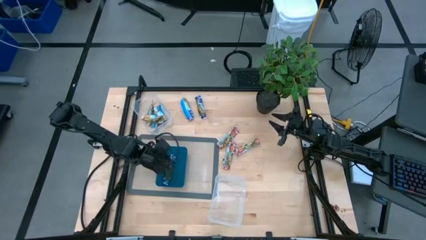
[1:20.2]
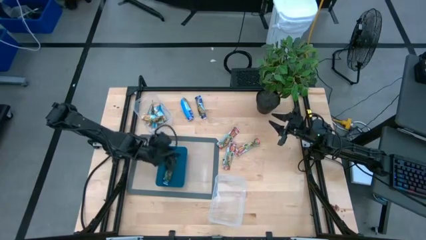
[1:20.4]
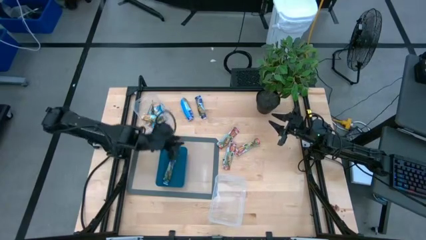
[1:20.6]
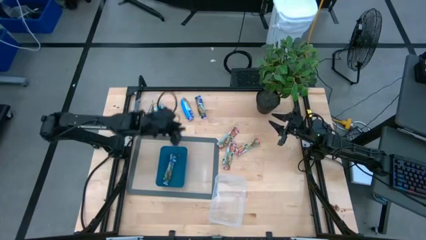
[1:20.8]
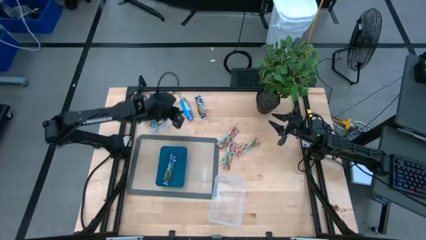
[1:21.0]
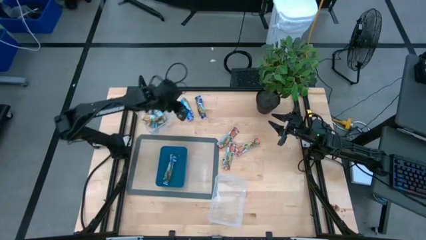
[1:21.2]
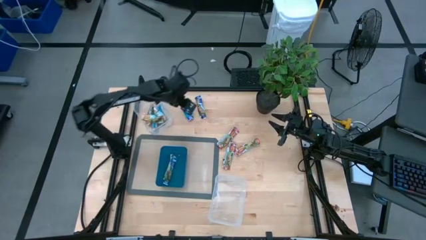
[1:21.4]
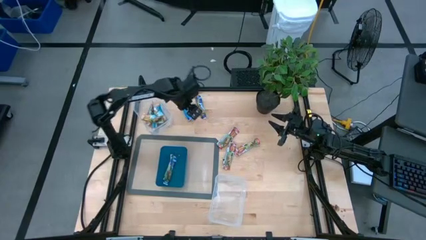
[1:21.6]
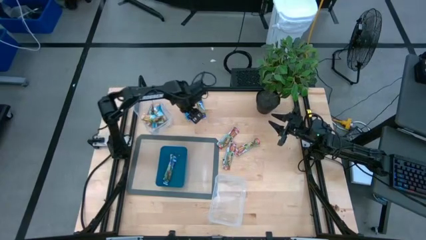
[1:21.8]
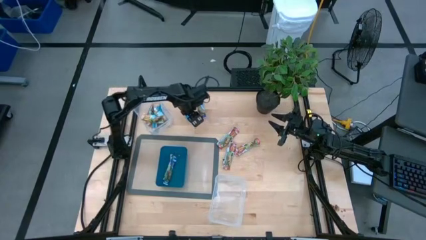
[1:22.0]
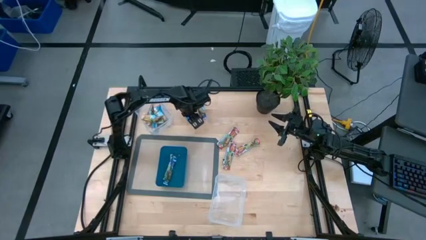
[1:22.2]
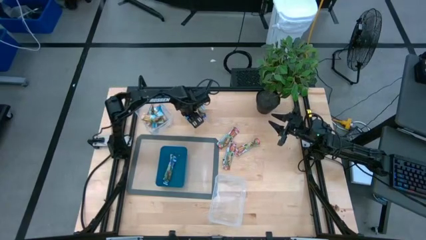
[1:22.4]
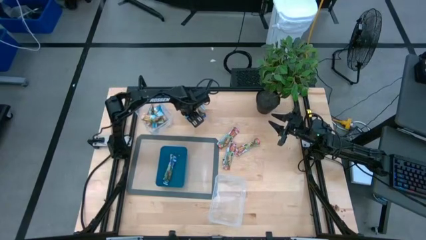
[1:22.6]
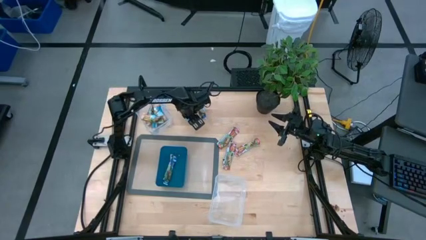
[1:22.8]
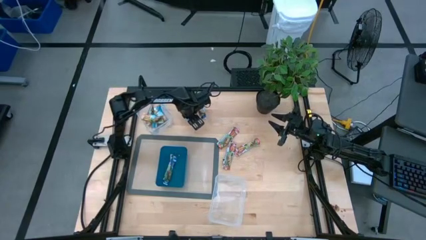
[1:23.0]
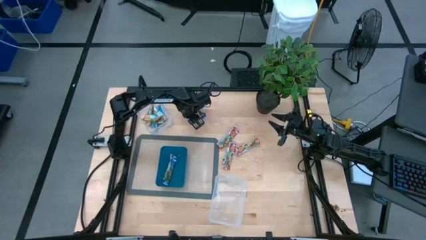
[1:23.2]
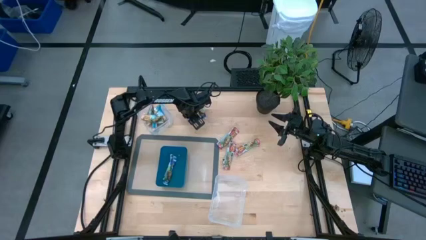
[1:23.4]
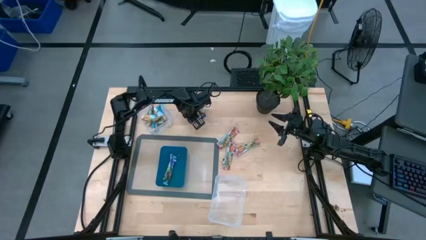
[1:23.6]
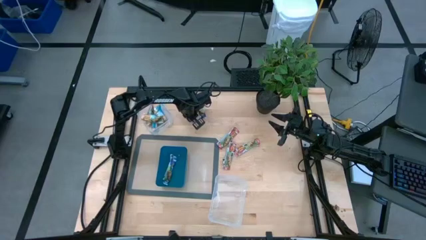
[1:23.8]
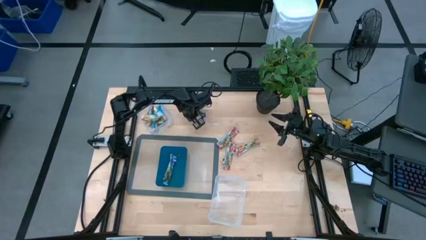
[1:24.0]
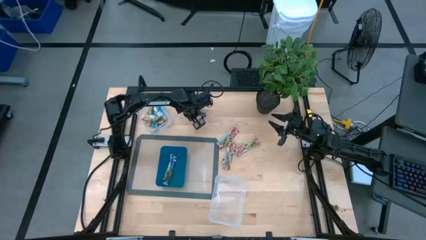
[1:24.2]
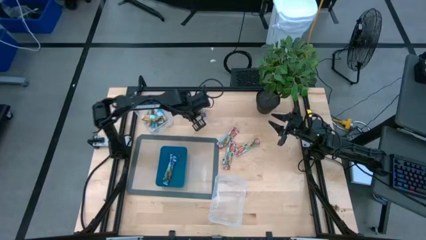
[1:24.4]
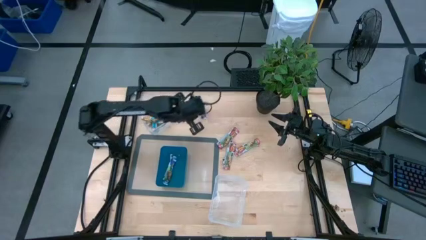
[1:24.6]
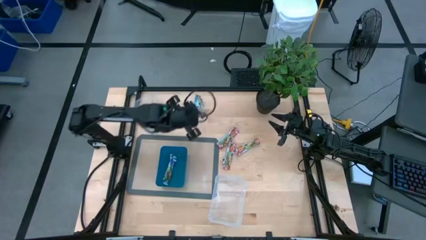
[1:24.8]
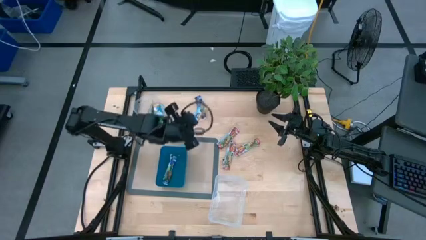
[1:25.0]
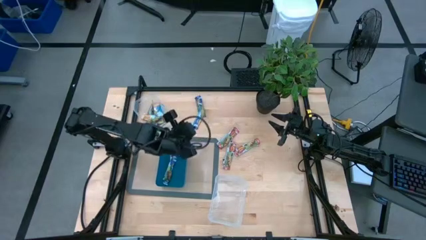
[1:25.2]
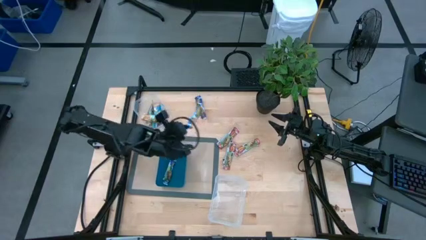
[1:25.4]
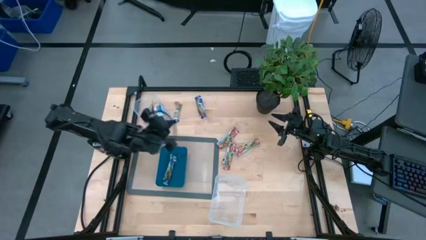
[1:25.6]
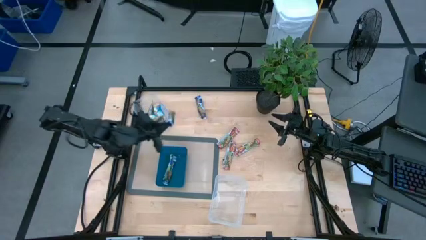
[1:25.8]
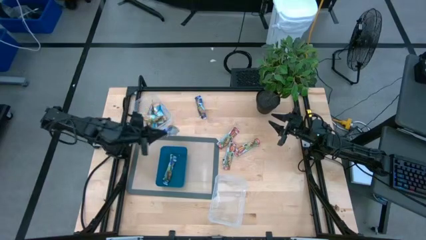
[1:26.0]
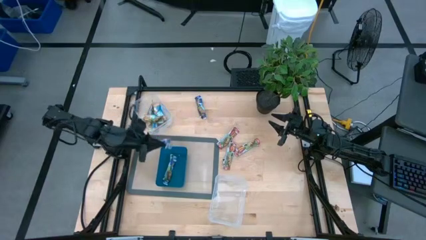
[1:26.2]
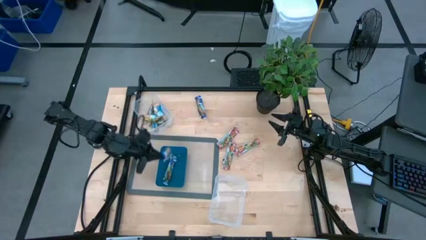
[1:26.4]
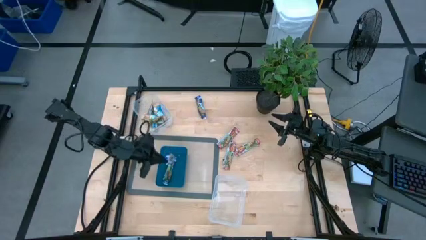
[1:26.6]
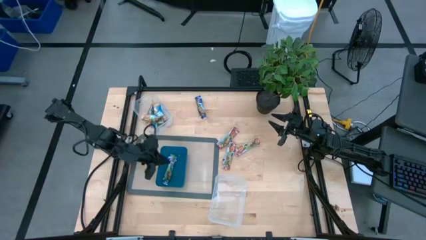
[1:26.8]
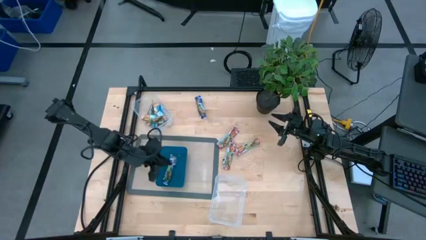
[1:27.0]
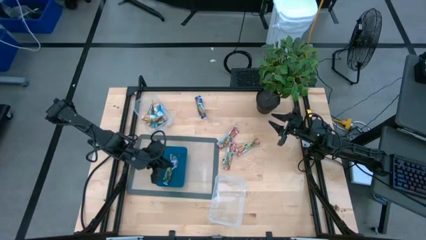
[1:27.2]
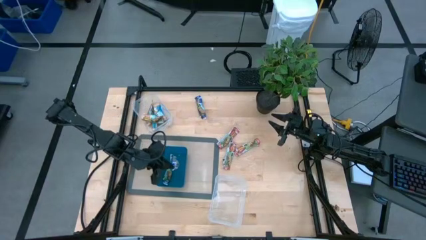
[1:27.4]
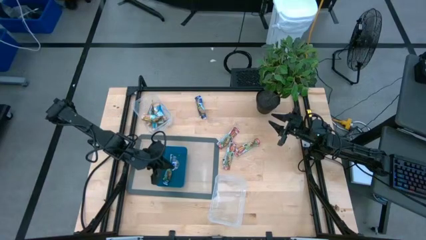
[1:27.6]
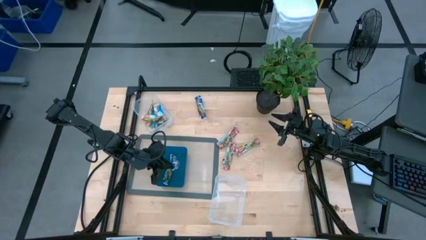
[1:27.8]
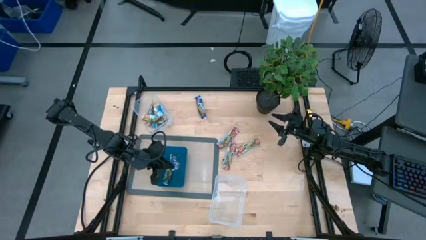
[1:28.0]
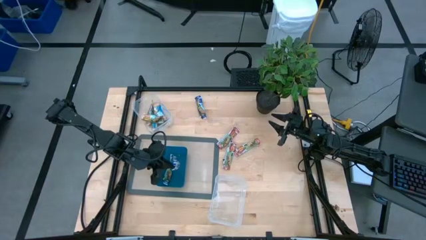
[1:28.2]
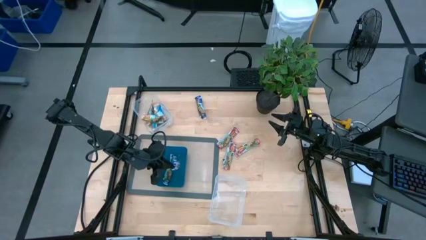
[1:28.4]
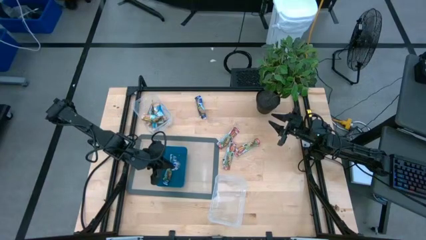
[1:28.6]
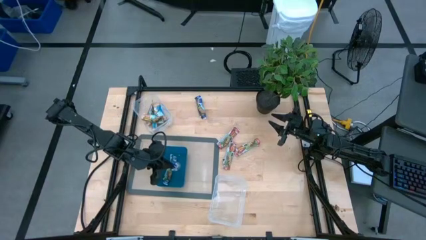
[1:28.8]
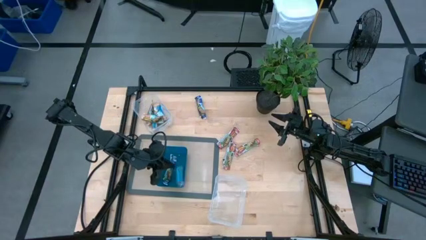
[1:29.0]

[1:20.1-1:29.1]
Task: Pick and place Granola Bars by type
Put the left blue granola bar into the blue bin

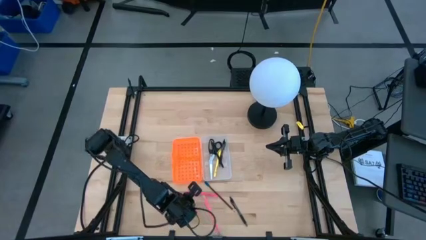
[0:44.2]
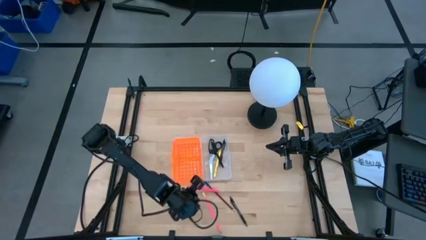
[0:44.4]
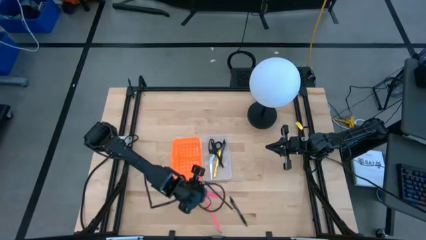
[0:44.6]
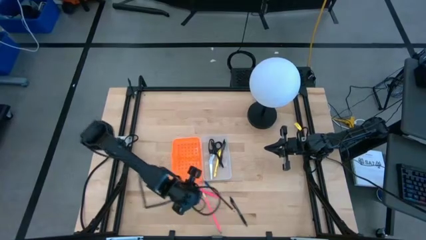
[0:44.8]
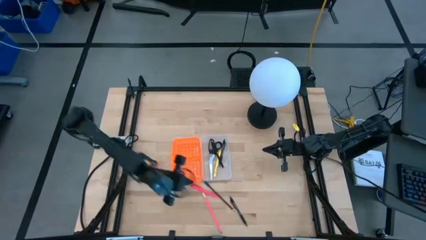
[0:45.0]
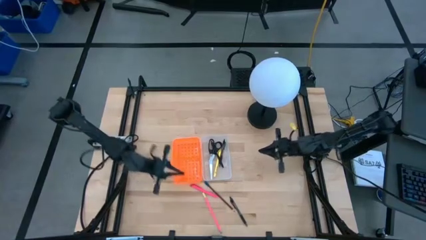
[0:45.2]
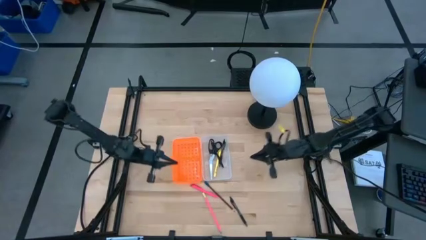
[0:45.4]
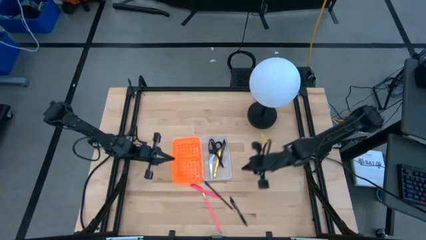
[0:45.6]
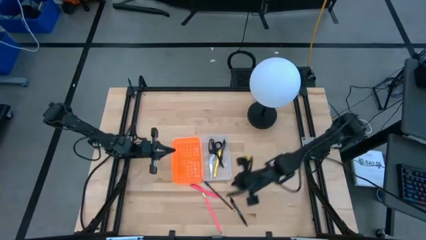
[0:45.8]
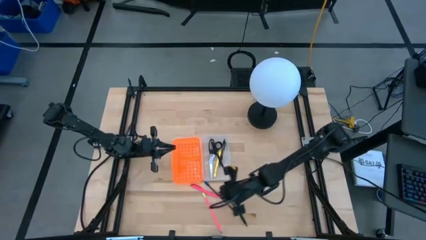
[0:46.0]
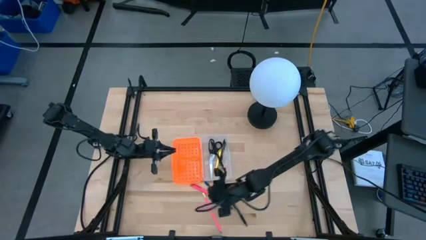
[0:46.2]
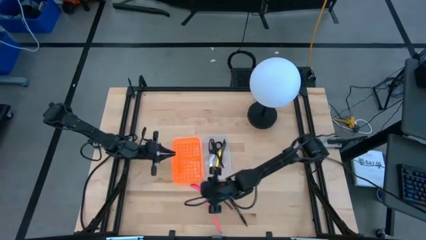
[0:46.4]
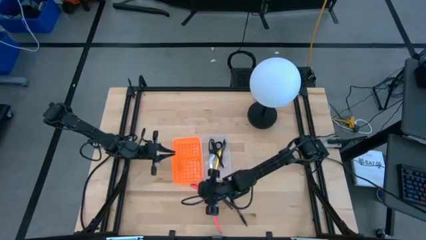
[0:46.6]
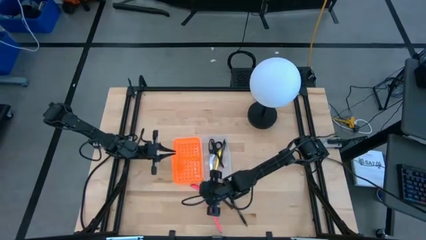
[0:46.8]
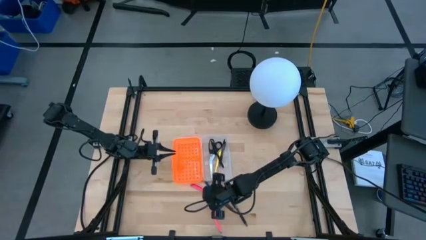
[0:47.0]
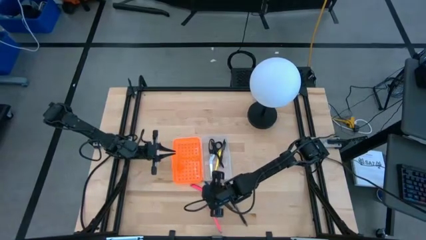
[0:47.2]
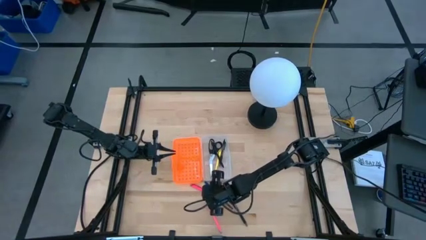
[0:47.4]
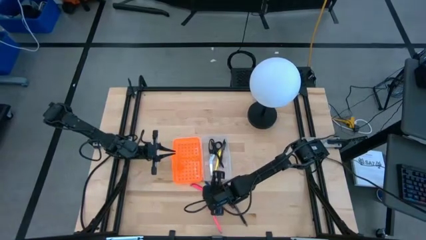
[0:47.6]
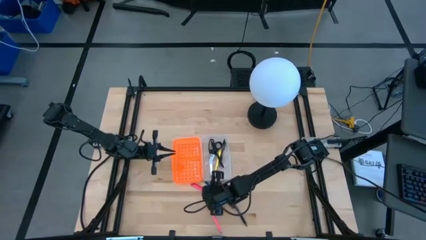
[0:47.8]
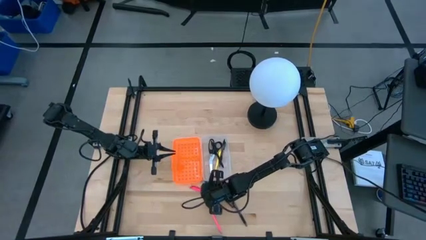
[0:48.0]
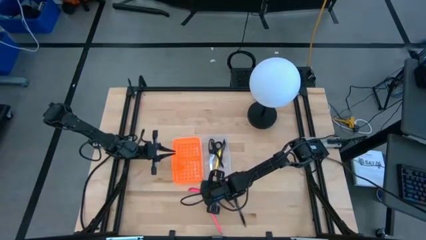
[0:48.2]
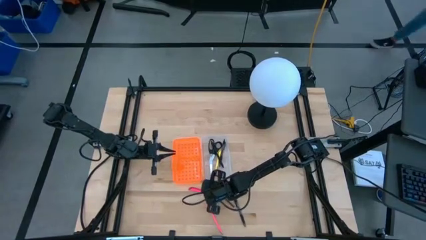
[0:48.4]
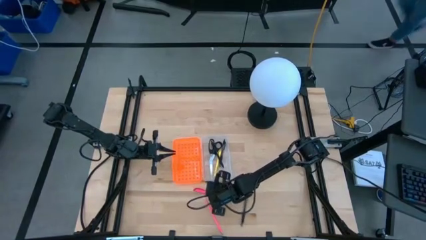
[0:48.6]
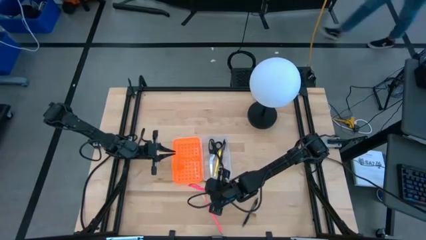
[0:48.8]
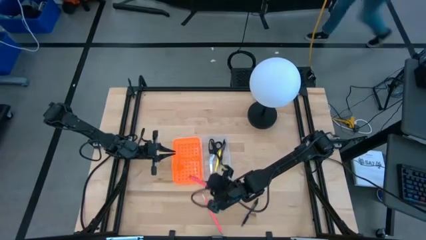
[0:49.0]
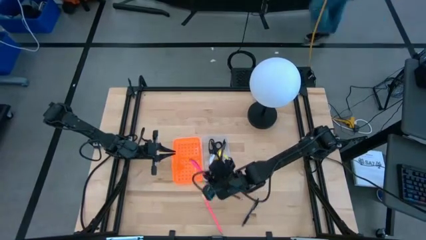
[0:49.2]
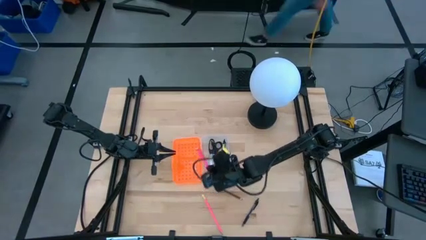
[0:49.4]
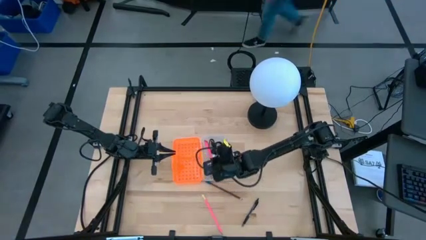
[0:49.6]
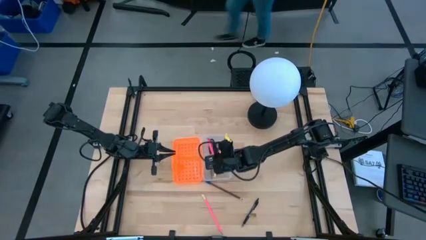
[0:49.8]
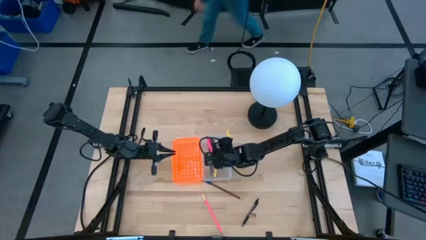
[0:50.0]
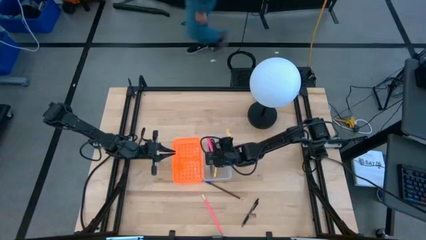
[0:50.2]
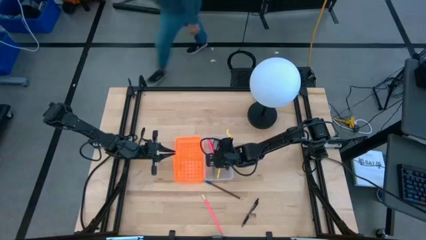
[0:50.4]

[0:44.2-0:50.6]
Task: Pick & place school supplies into a supply box
Put the pink pen into the supply box
